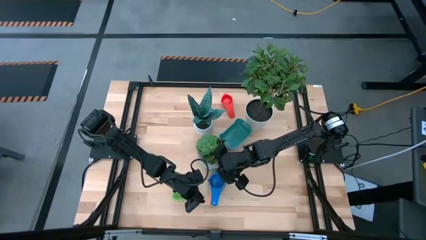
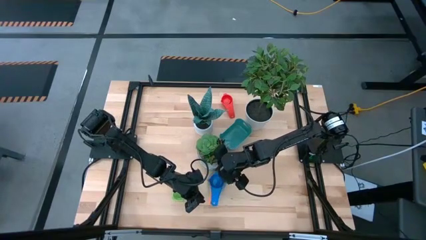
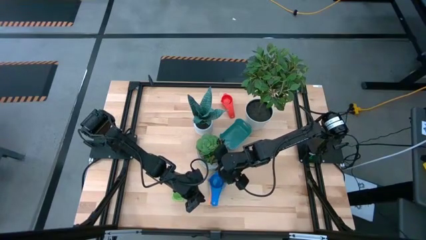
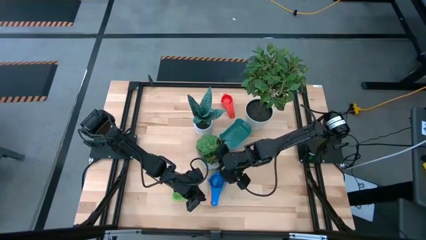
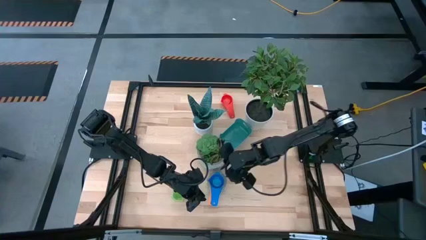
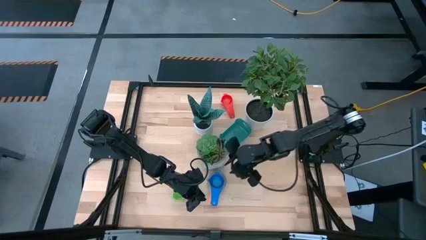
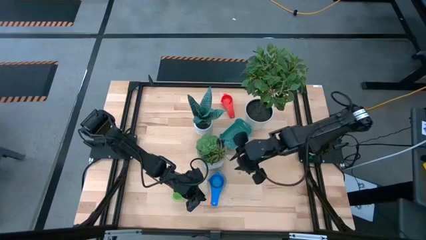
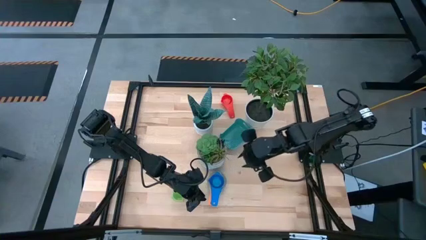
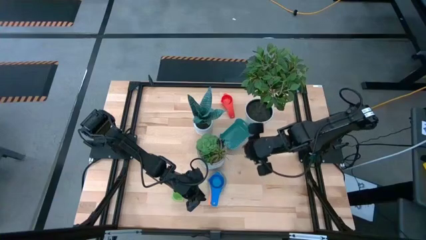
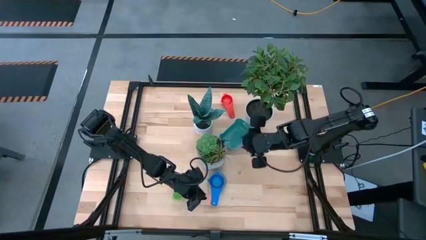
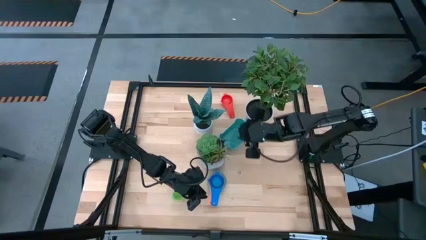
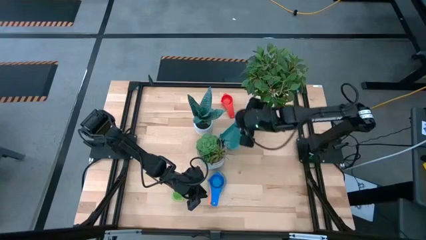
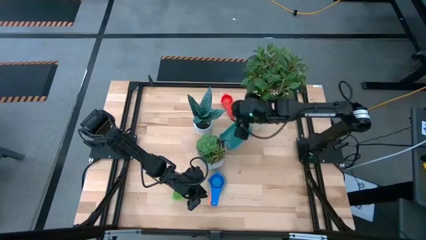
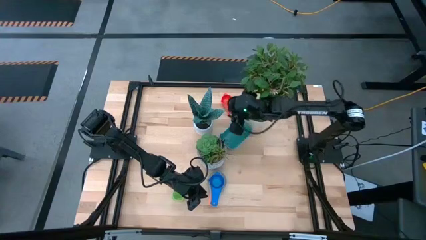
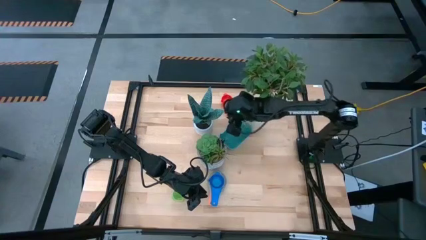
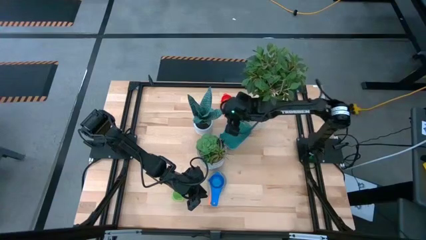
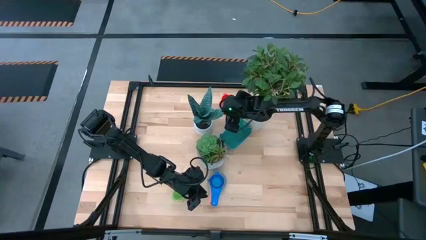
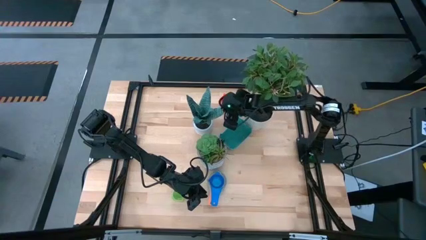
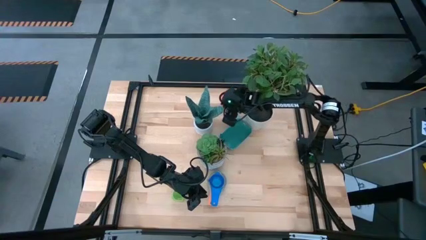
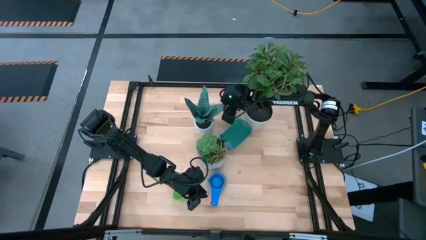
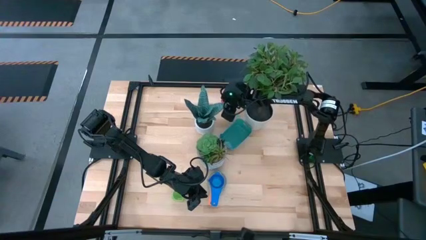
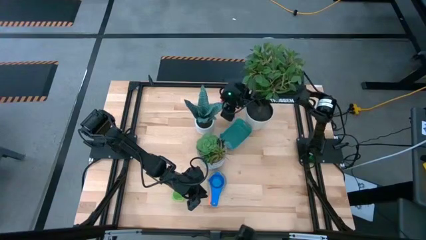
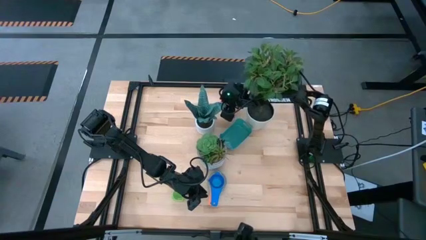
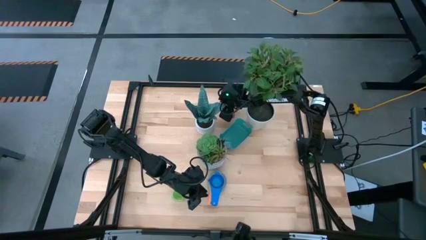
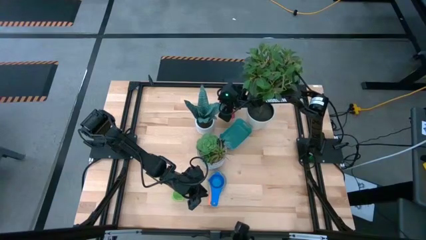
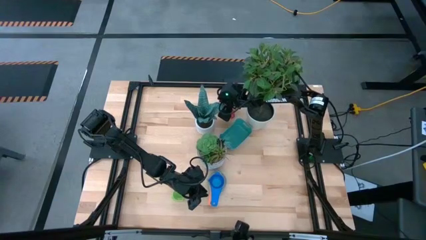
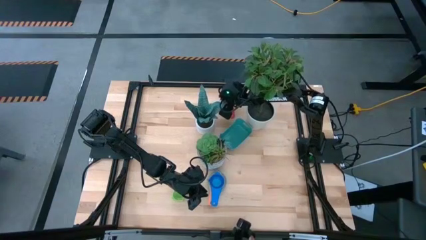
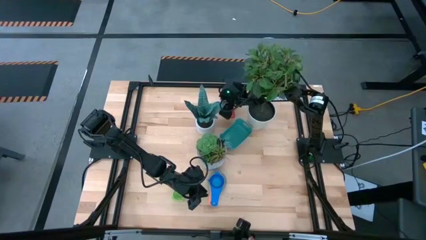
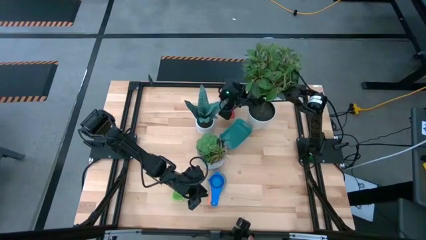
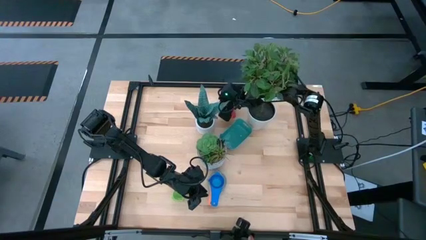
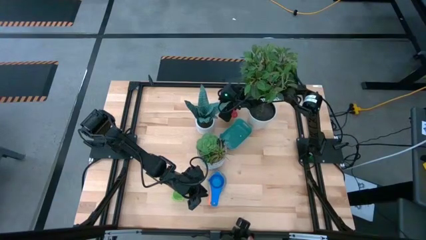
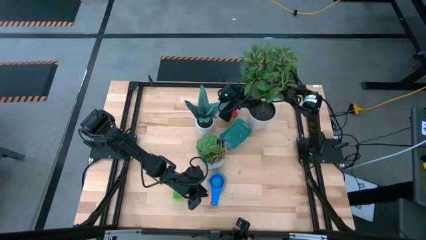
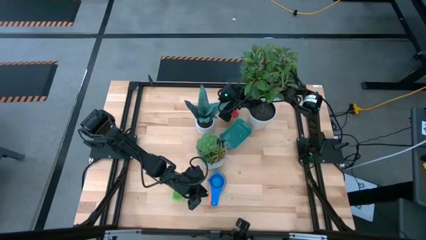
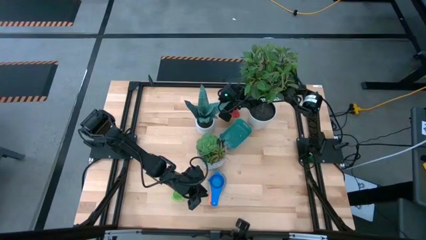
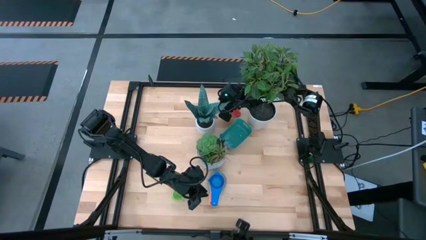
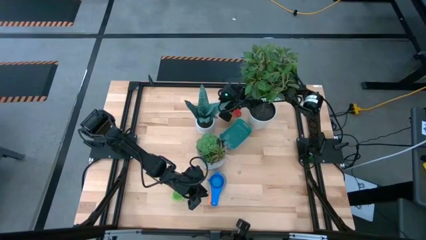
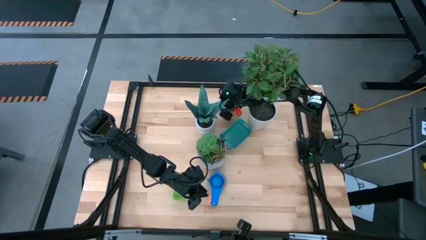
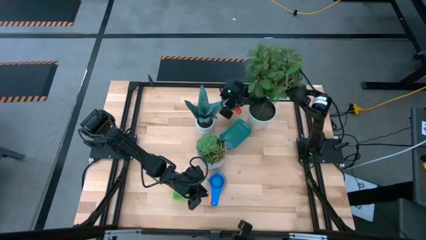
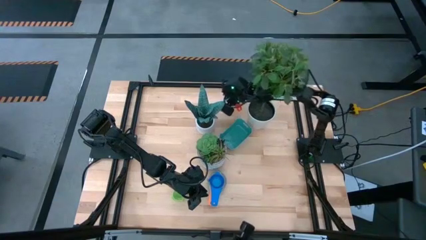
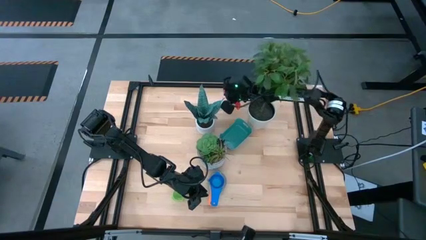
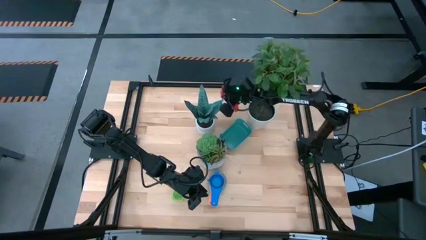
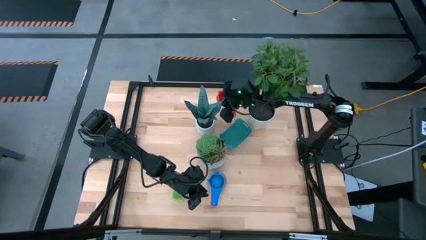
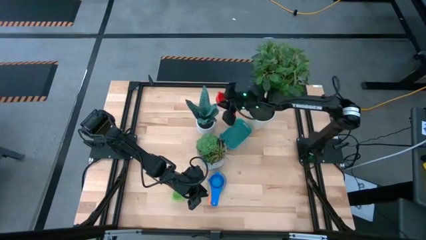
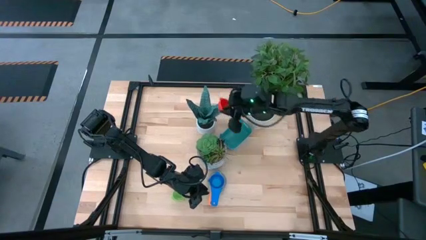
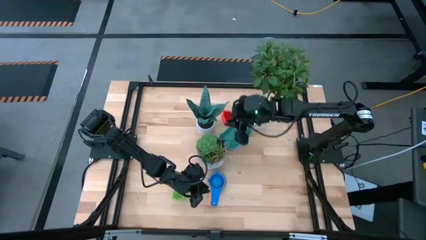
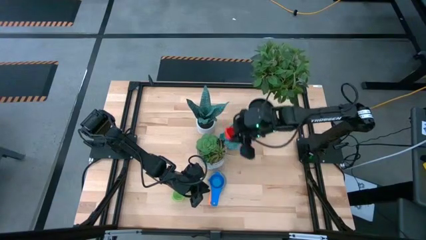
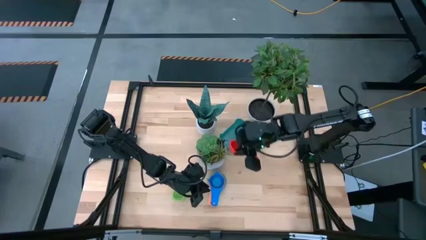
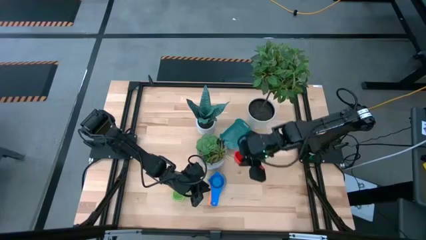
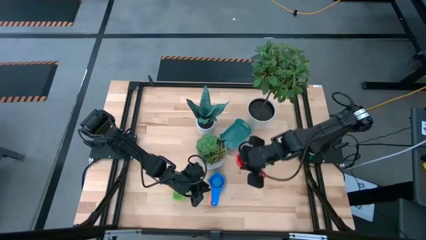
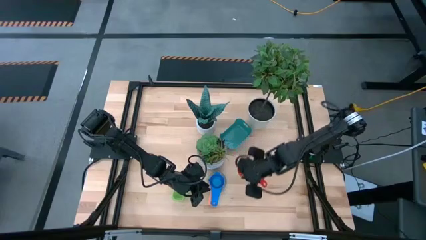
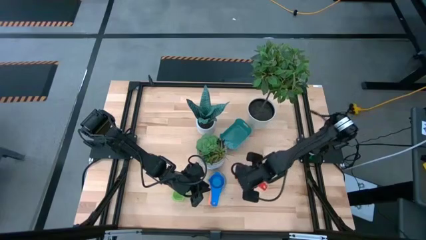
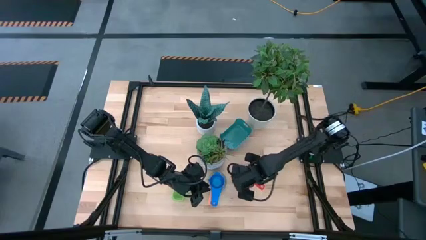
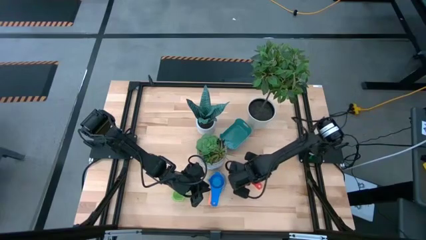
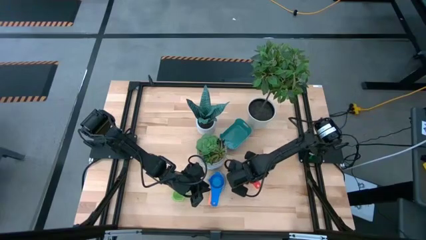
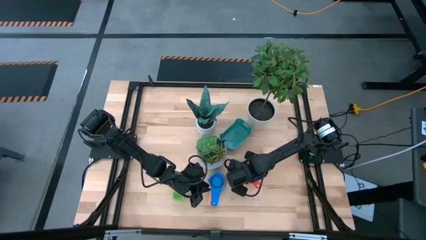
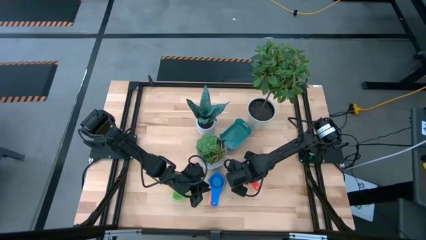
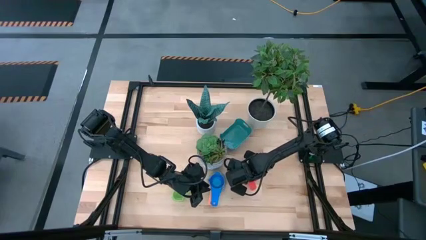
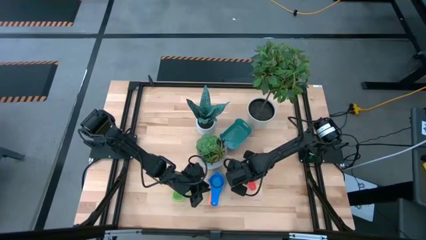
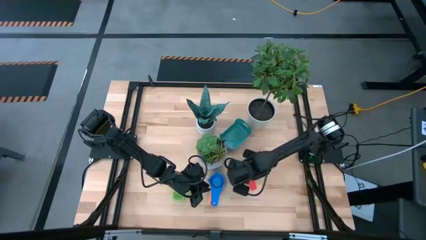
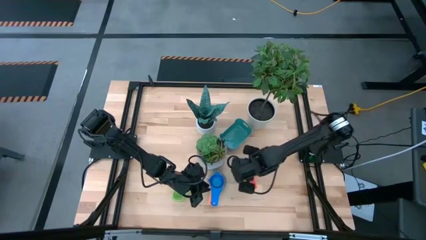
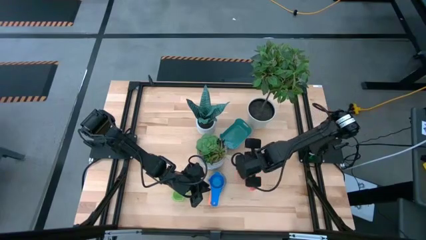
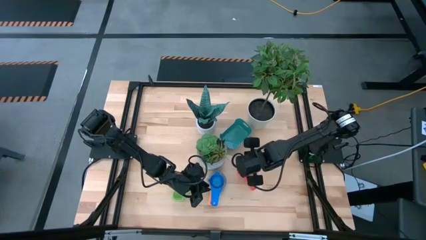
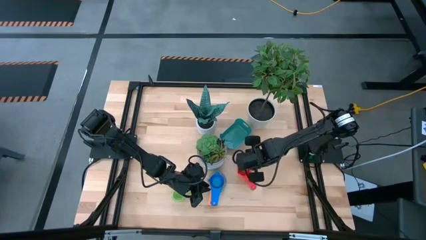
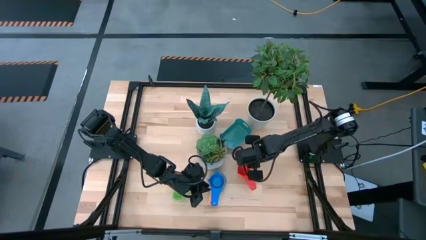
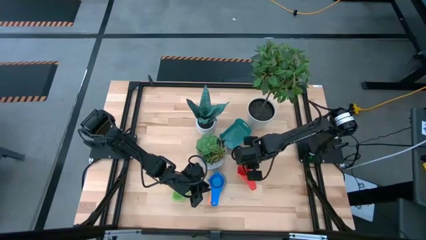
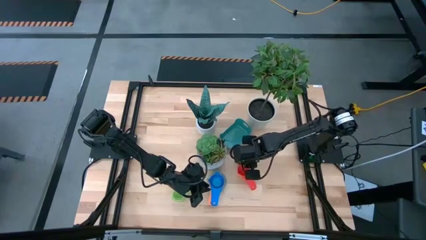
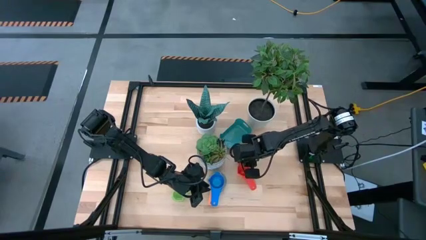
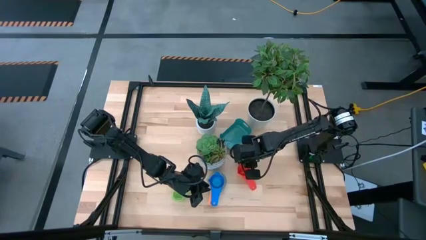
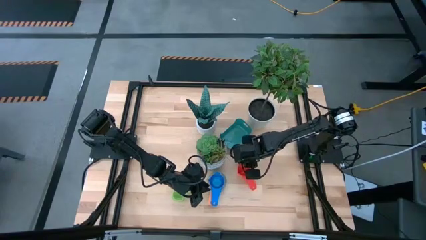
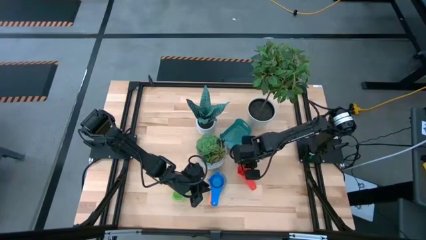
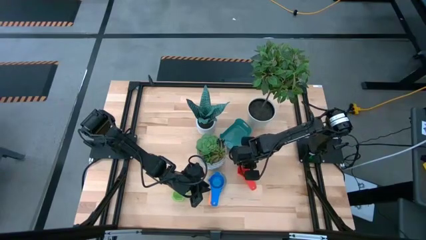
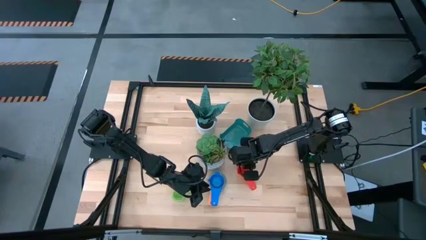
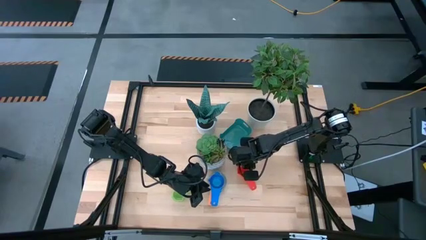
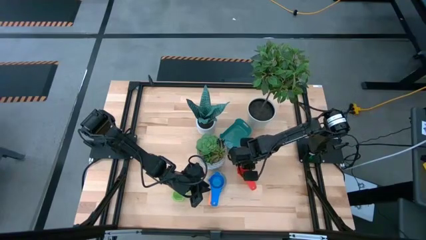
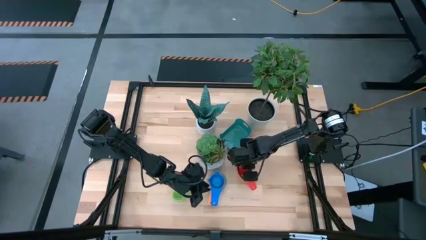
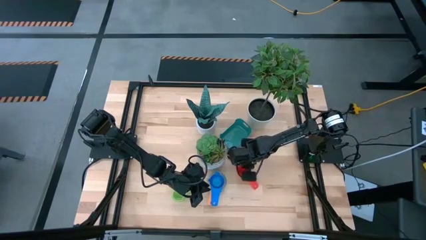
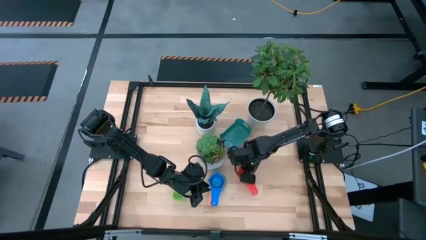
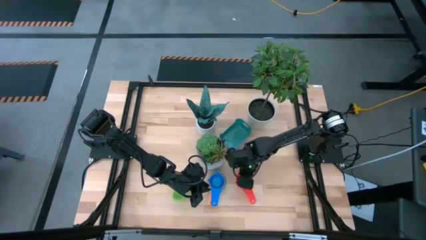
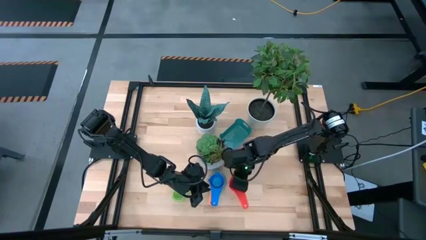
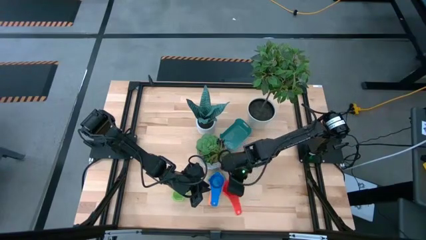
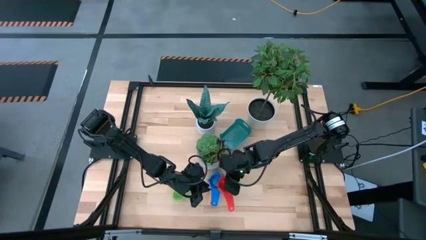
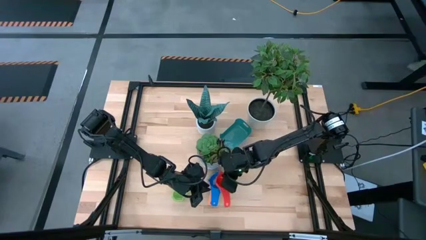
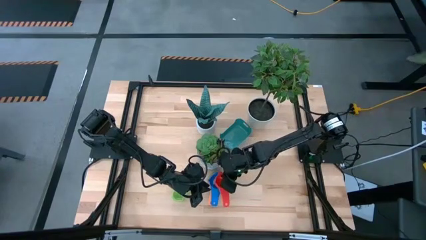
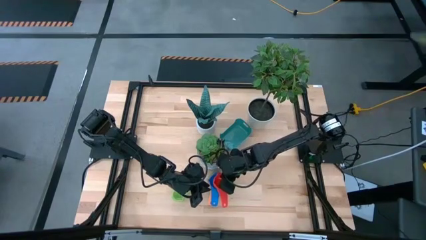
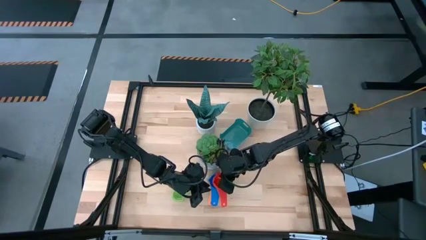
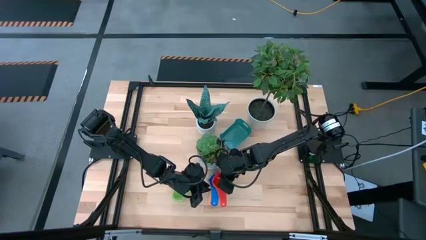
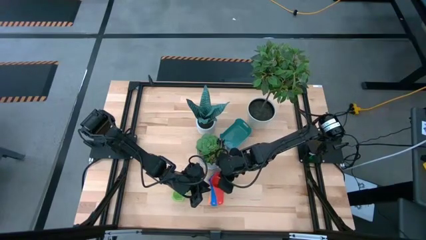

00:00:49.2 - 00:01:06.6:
Task: Nest measuring cups in basket
Stack the red measuring cup on top of the blue measuring cup
